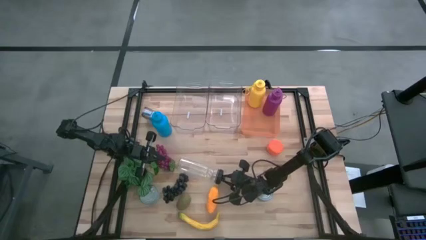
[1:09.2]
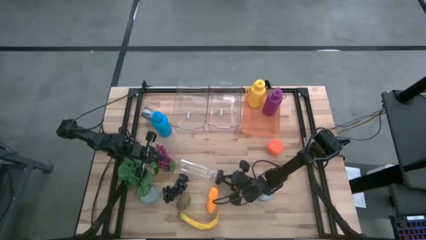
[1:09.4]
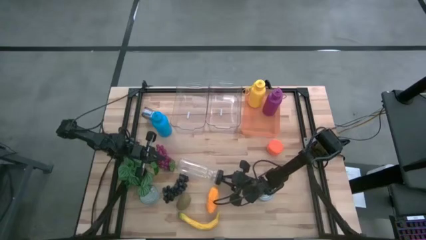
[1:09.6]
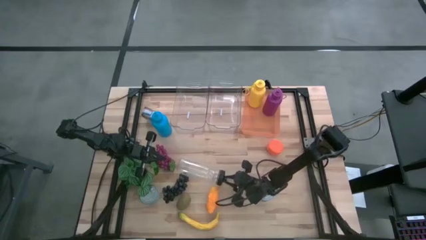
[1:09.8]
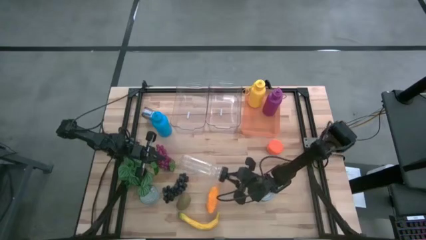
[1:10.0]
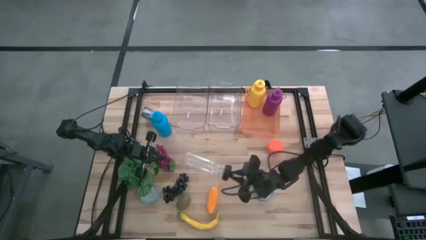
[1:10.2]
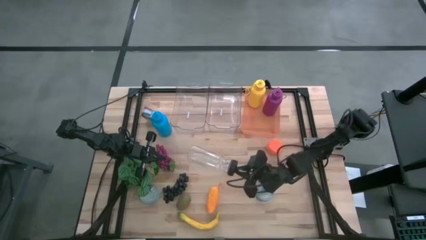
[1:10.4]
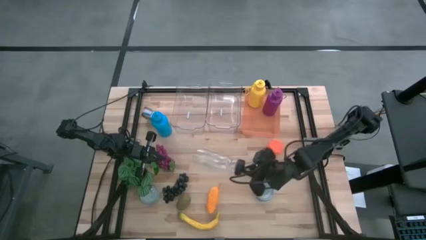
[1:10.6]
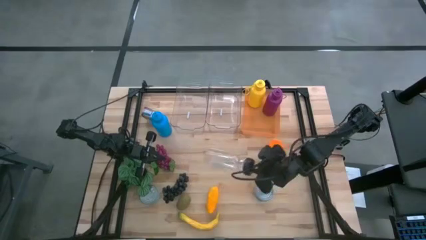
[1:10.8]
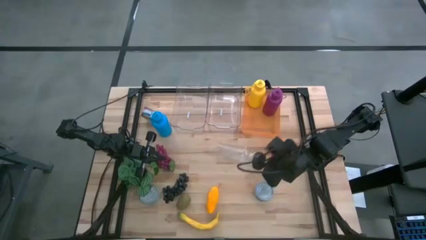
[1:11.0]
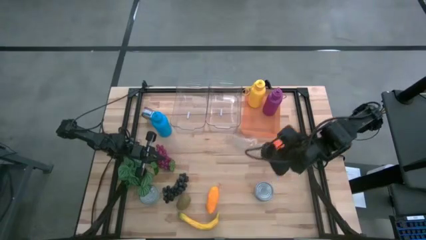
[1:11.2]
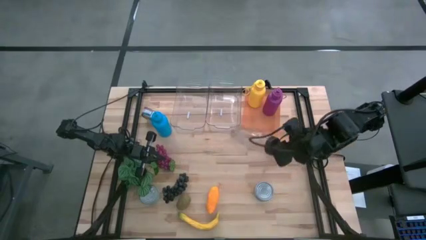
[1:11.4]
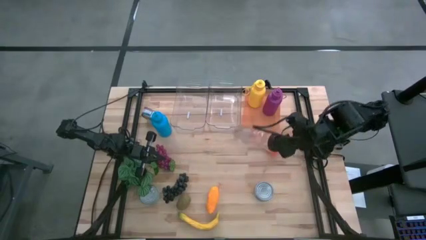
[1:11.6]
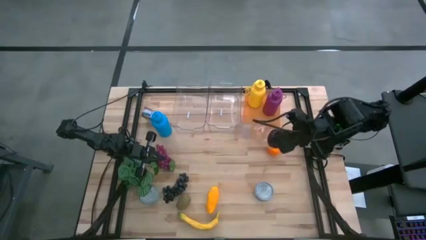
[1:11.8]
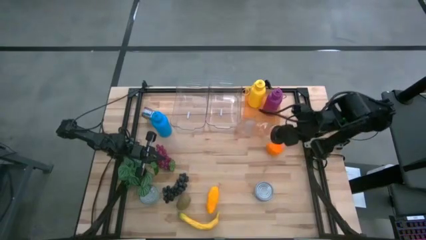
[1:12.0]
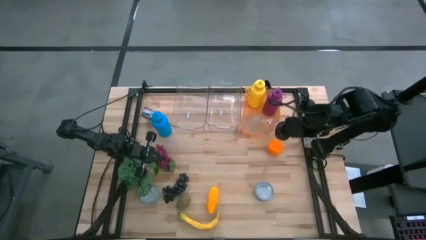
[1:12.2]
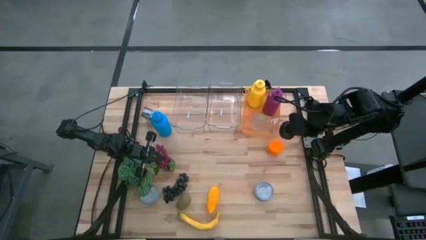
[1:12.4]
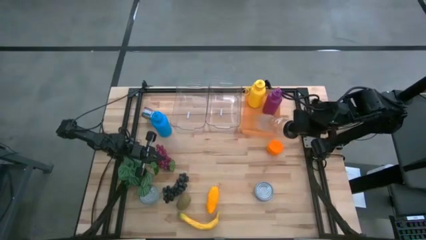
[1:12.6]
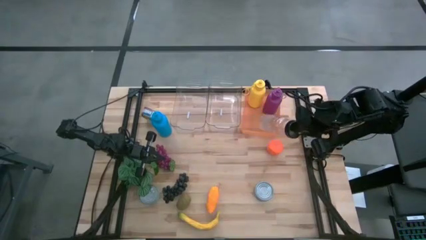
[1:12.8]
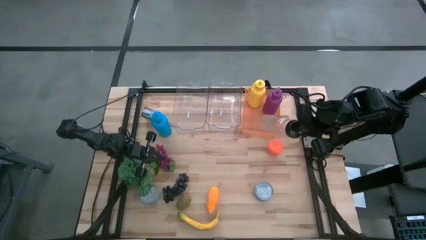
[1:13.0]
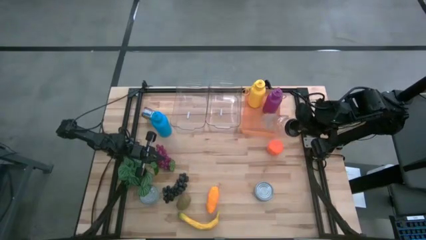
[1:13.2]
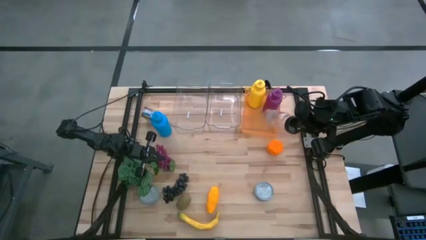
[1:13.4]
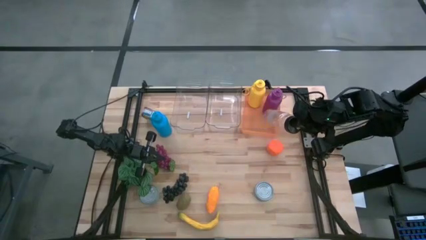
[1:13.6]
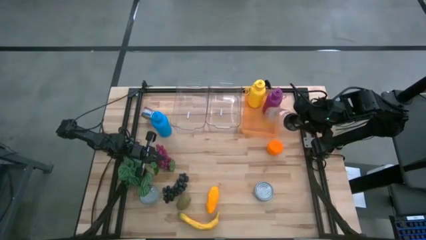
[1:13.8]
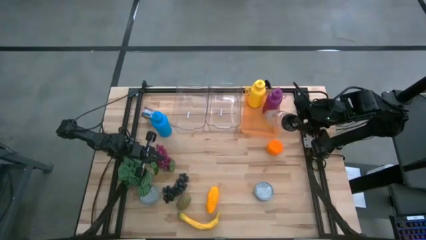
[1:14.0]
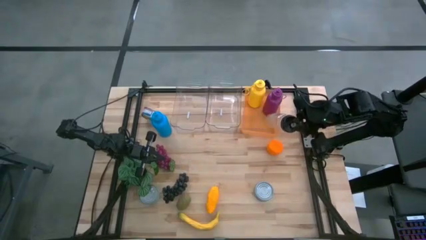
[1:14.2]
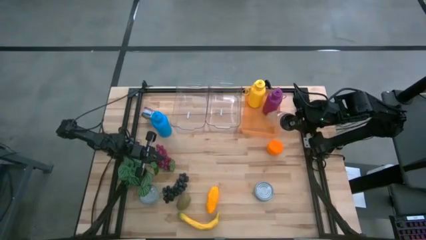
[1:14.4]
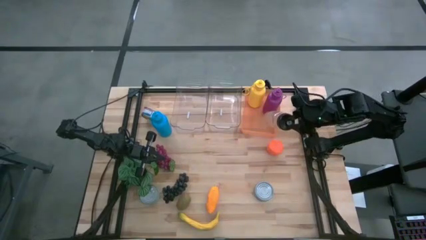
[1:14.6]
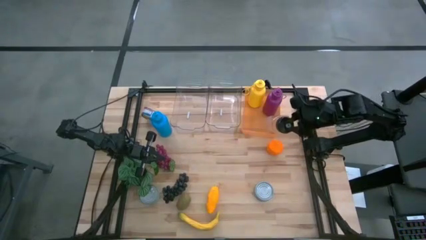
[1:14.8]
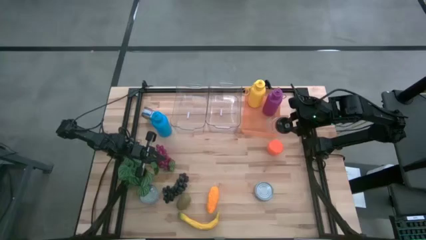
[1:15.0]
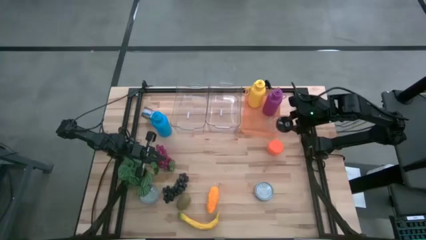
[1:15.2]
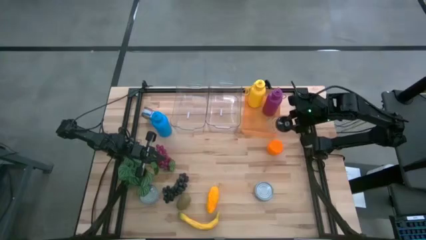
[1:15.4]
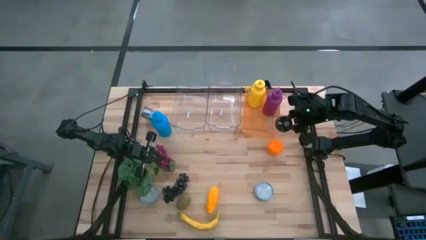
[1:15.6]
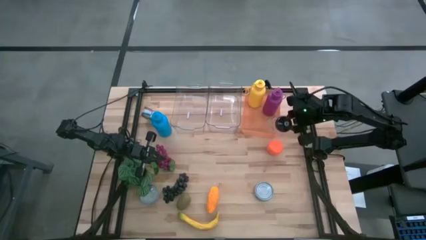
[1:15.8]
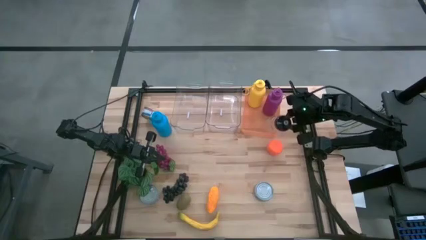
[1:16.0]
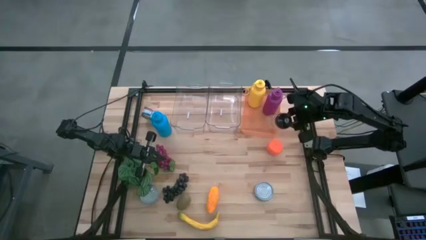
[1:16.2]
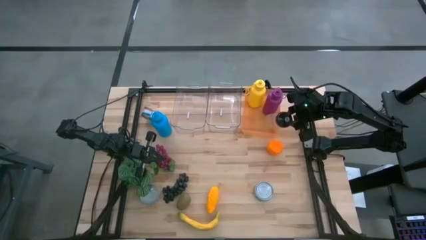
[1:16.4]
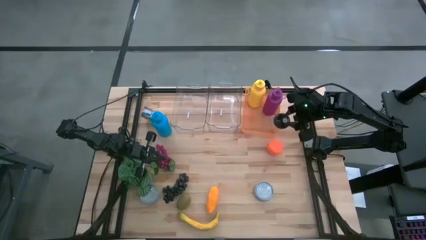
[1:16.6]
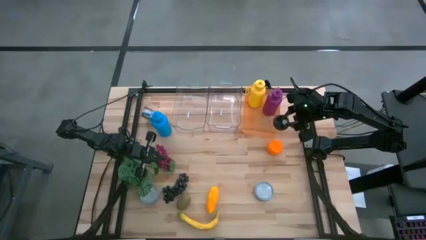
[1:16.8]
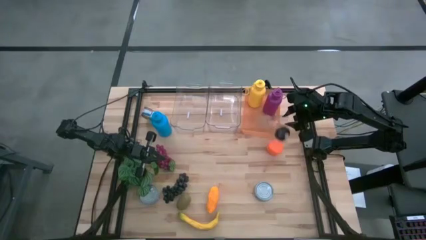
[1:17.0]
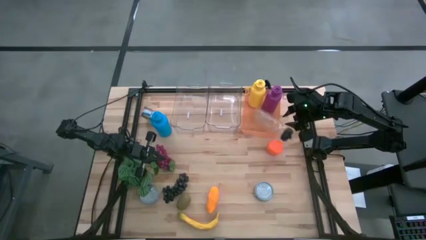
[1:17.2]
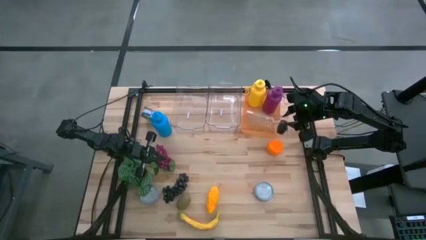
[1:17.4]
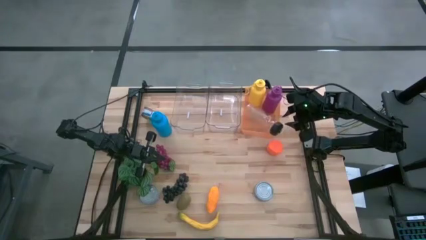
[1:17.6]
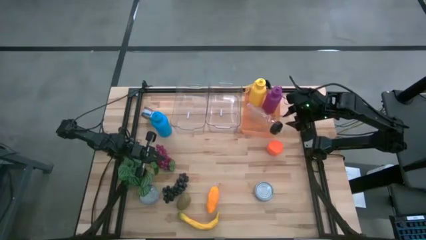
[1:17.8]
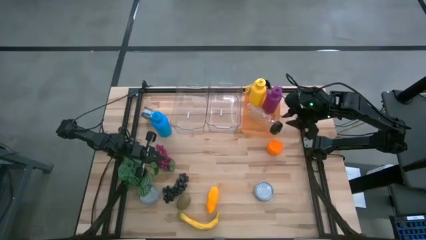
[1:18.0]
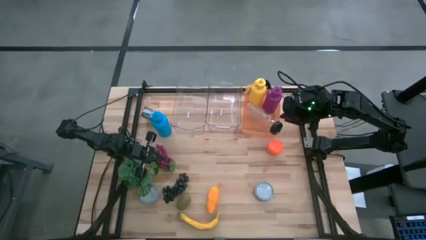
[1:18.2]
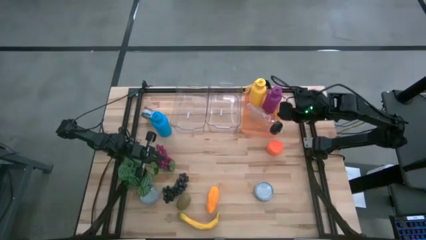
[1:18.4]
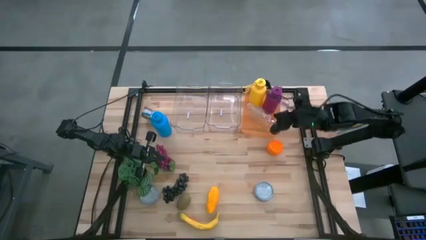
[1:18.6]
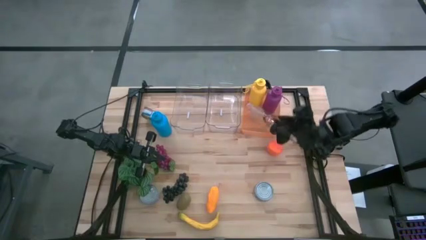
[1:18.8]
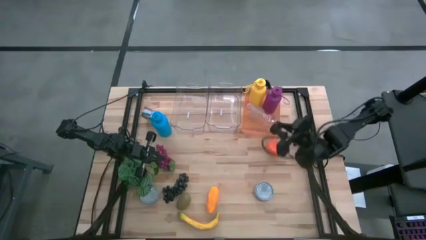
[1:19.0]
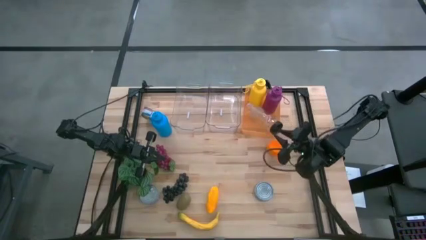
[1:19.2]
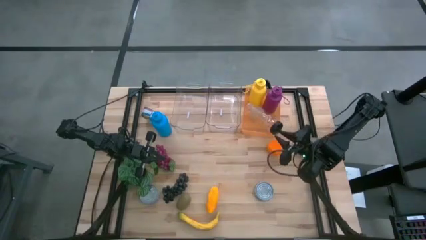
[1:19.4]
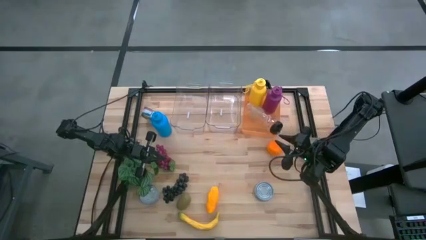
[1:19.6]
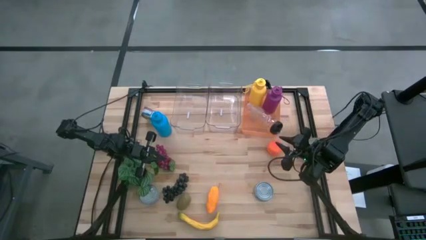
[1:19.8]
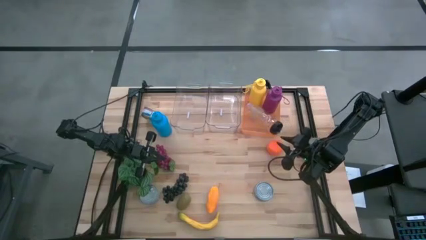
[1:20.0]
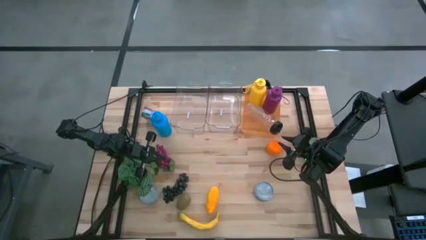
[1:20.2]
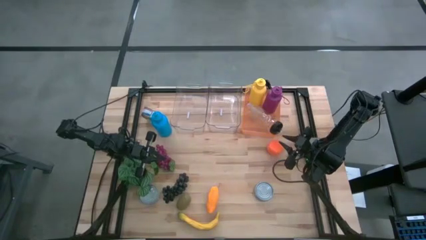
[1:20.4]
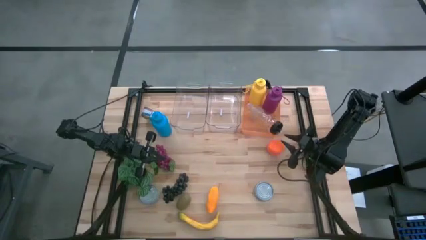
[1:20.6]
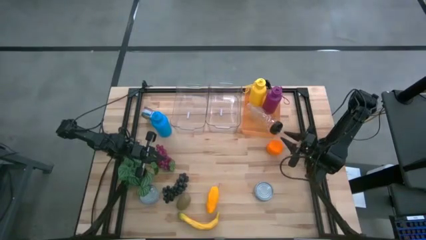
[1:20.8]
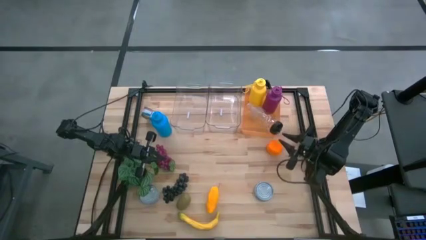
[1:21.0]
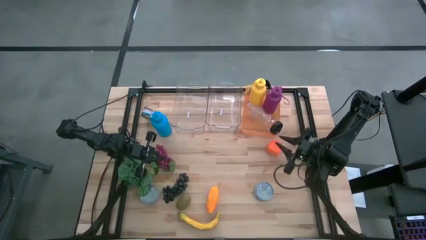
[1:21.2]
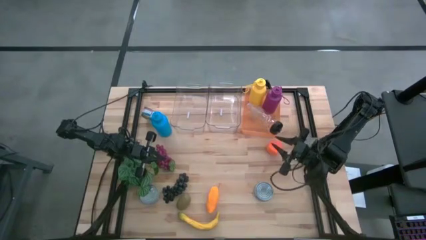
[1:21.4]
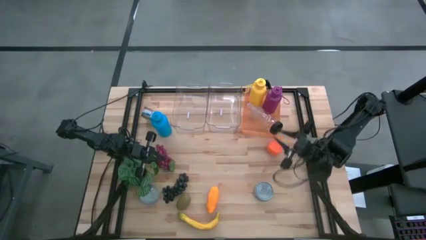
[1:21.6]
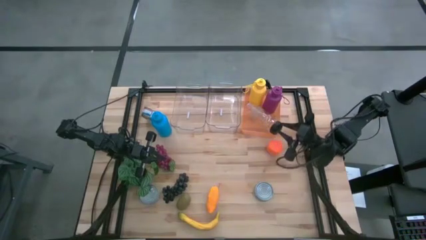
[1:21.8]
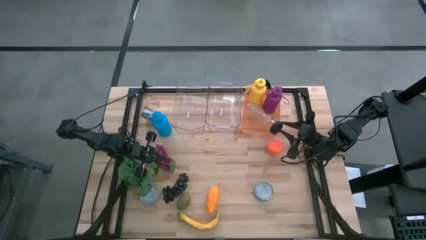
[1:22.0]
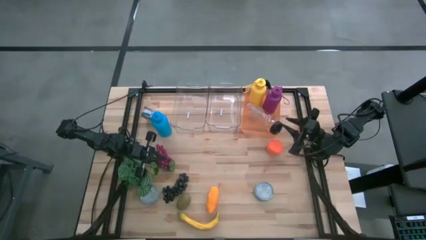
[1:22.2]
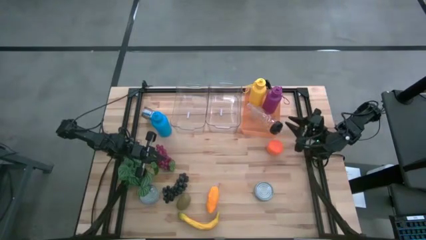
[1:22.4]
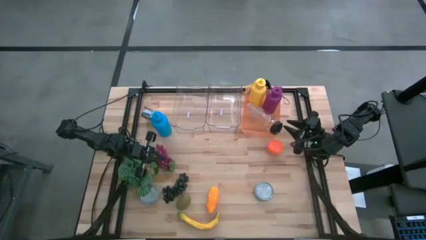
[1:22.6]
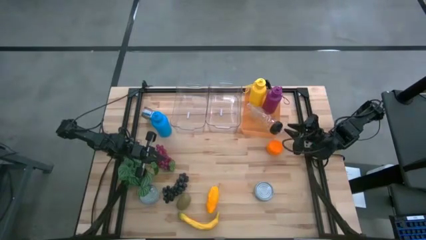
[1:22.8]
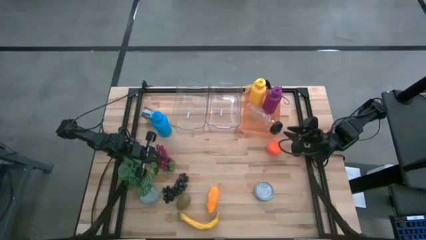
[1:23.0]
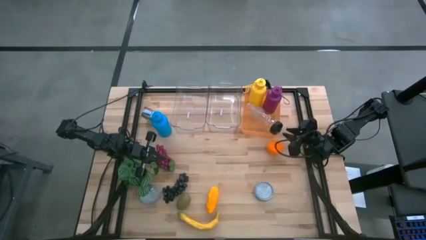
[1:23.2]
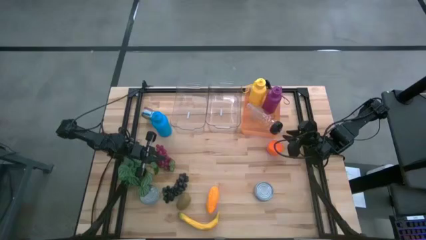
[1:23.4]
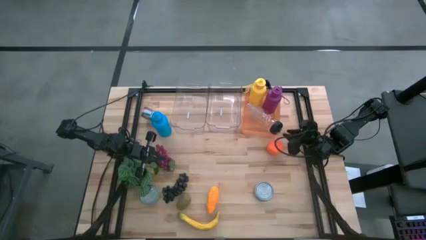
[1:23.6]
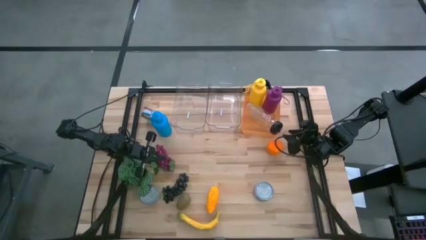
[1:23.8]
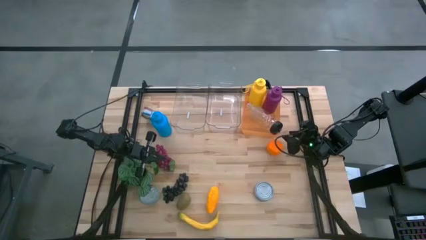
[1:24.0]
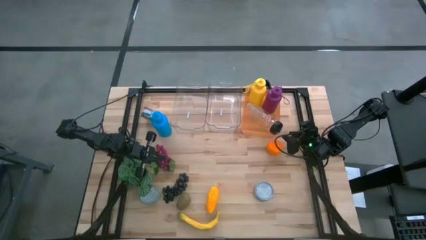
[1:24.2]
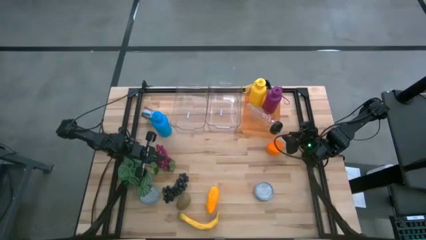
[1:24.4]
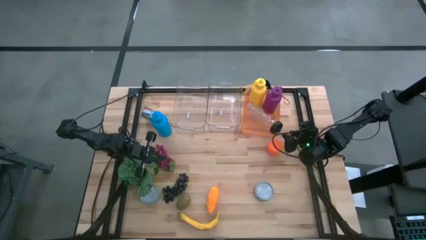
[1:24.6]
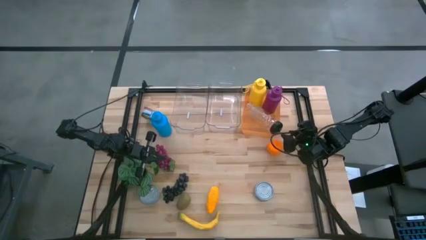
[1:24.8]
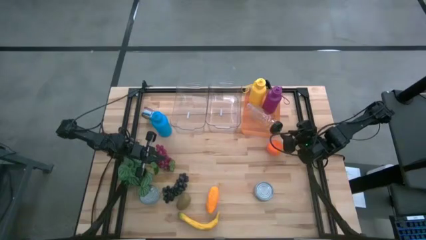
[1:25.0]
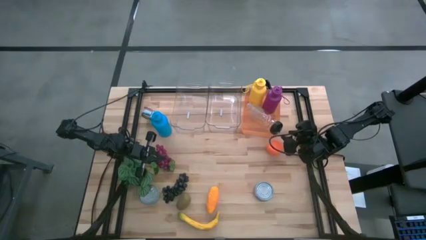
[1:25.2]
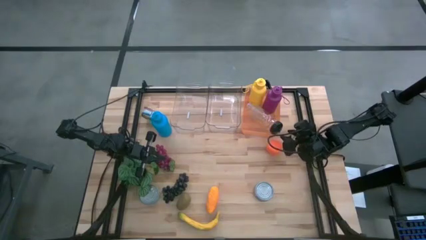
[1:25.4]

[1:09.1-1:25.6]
Task: Pick & Place Food Item
Put the transparent water bottle into the orange bin
